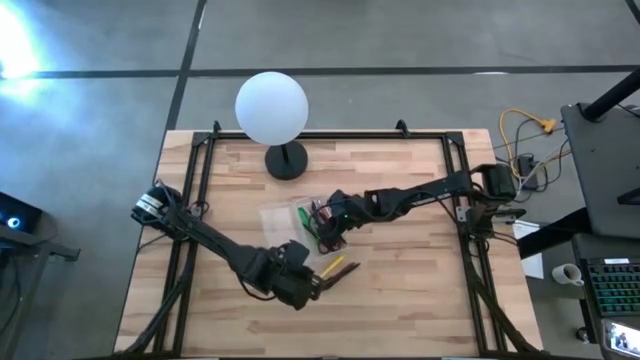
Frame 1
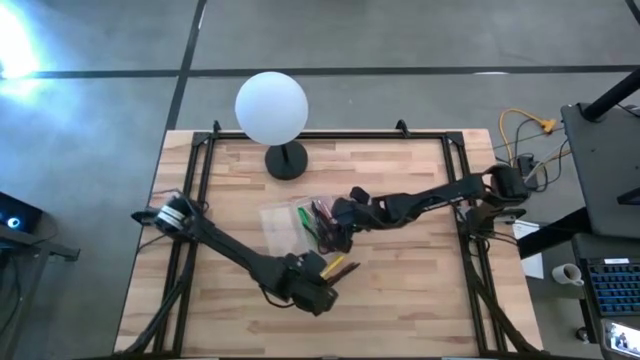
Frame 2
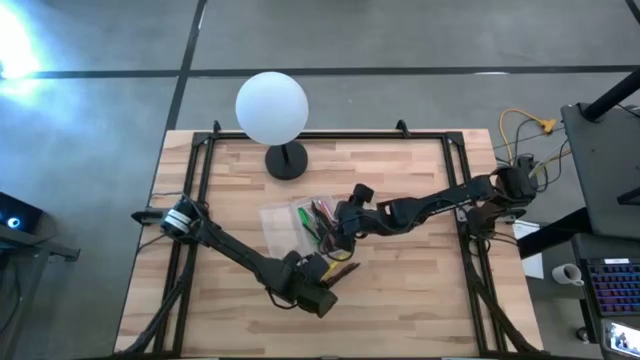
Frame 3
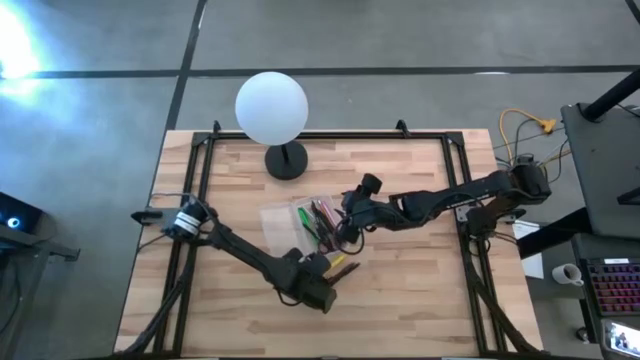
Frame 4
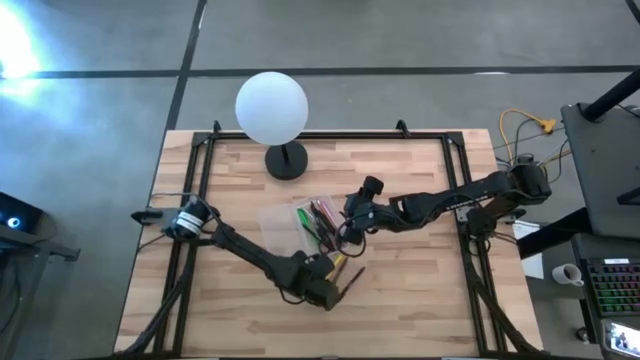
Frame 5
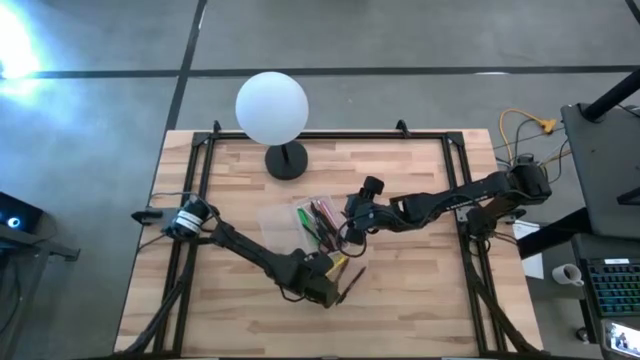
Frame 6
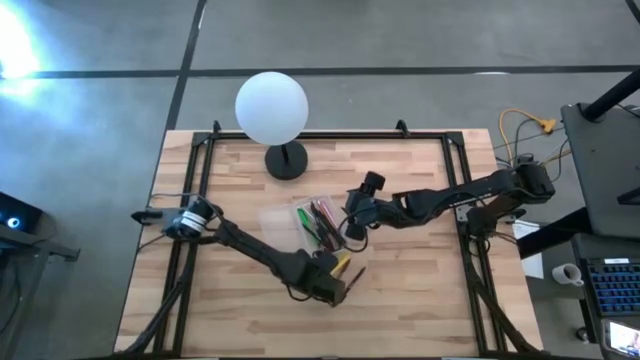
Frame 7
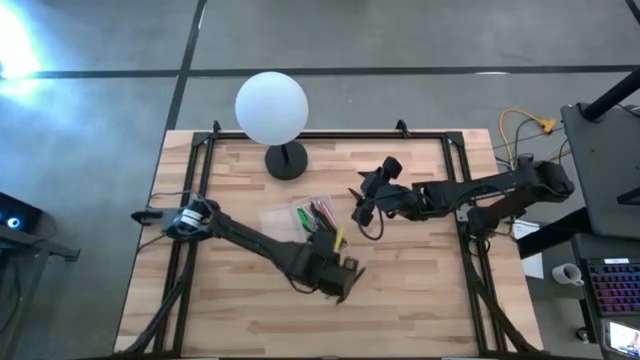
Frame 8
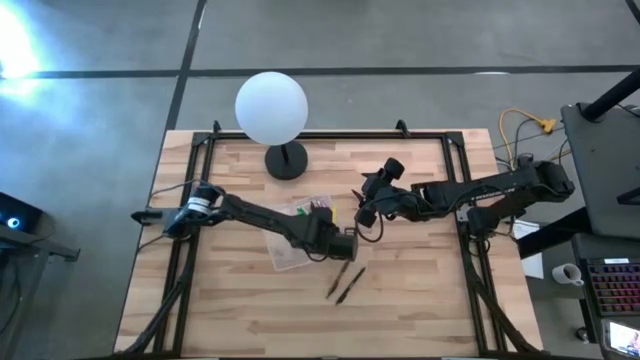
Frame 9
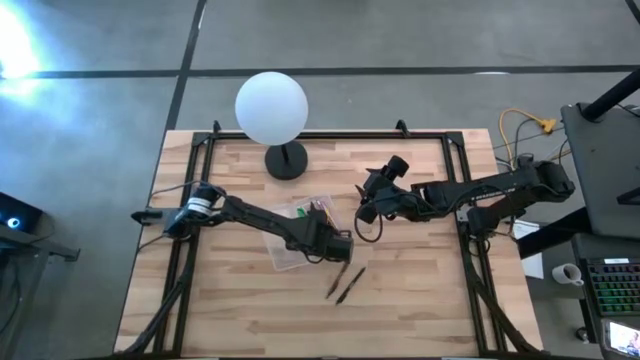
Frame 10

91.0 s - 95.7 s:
Task: Pick & place school supplies into a supply box
Put the yellow ballpen into the supply box

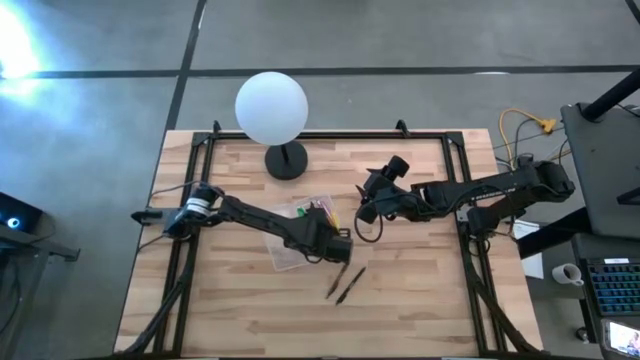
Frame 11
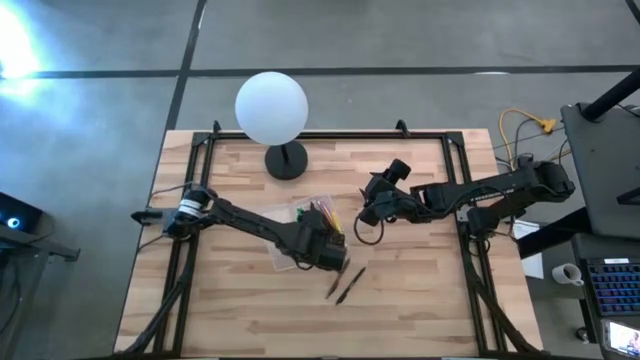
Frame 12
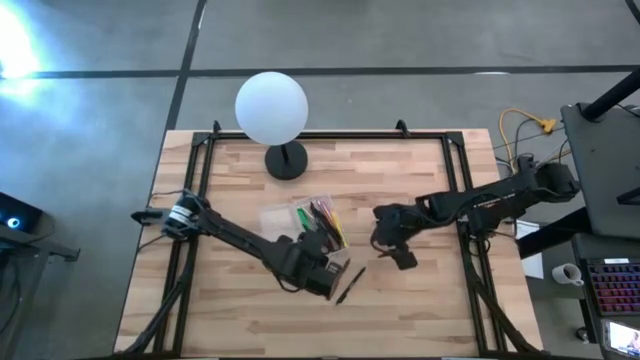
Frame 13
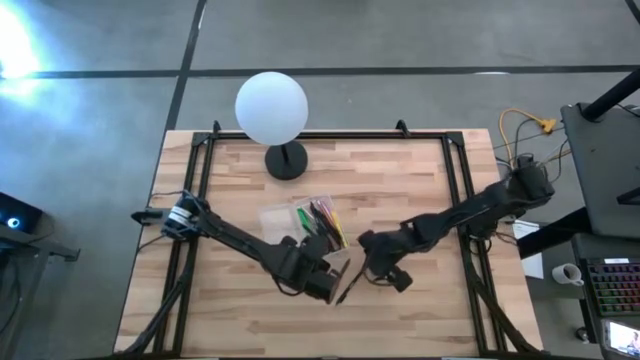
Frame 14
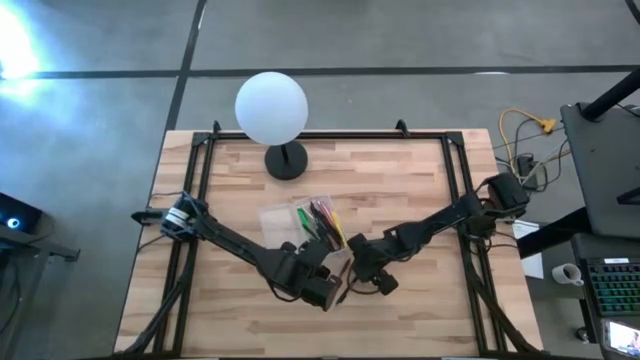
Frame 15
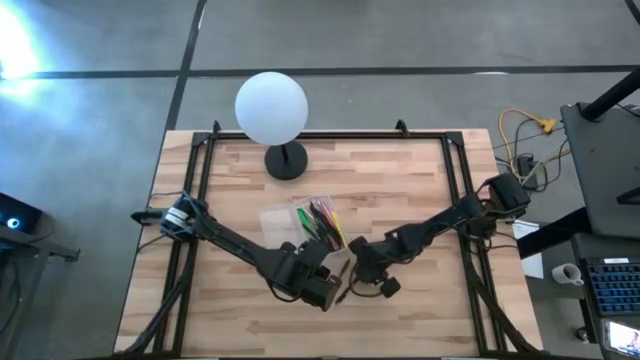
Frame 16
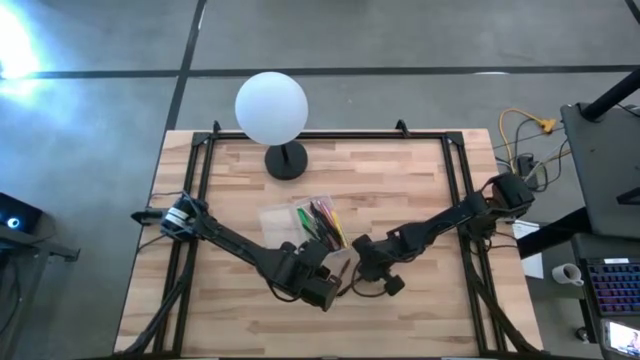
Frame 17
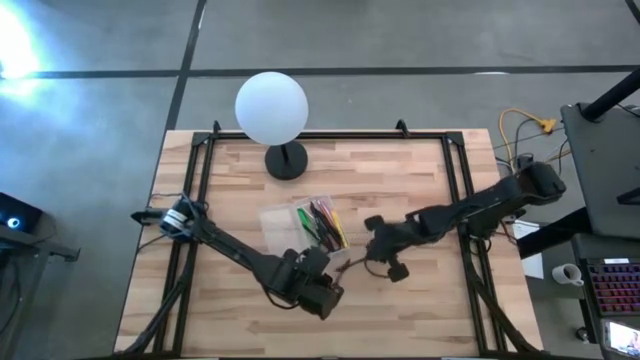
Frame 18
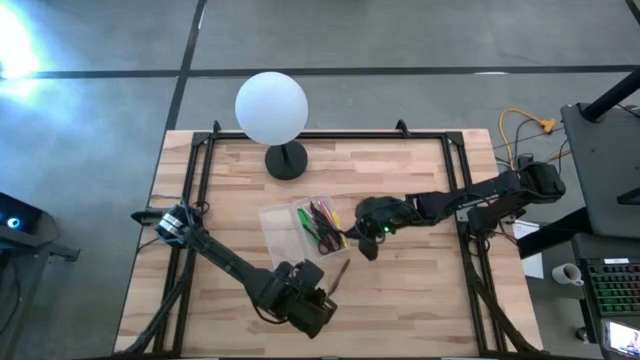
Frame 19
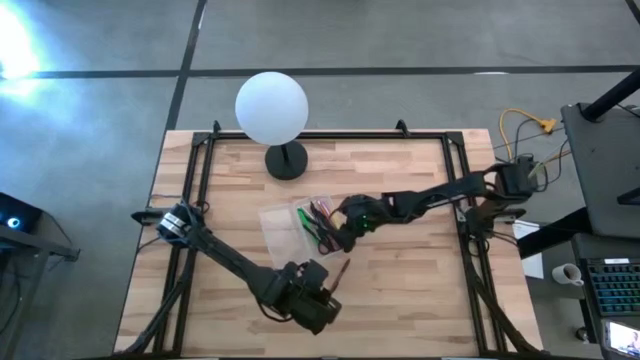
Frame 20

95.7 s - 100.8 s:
Put the black ballpen into the supply box

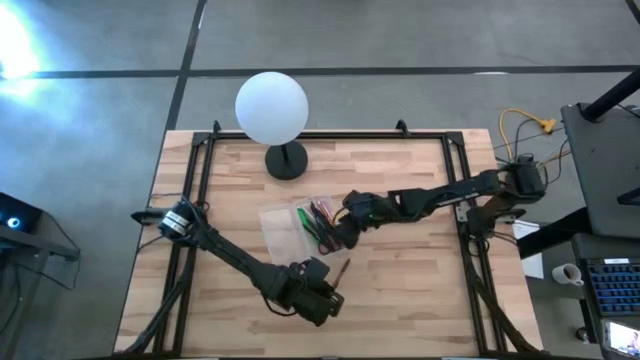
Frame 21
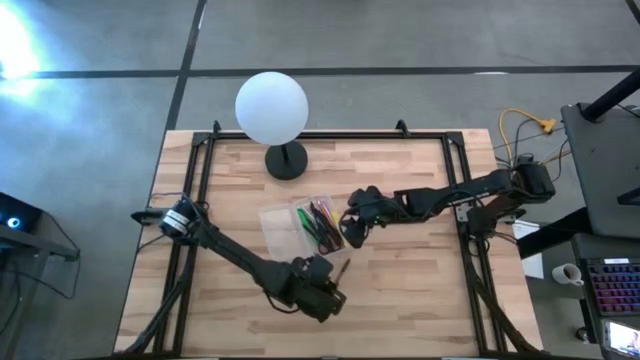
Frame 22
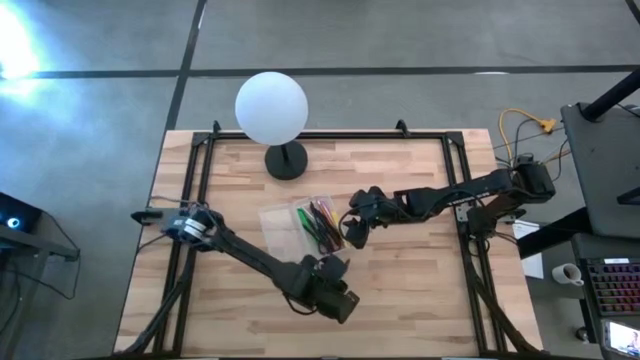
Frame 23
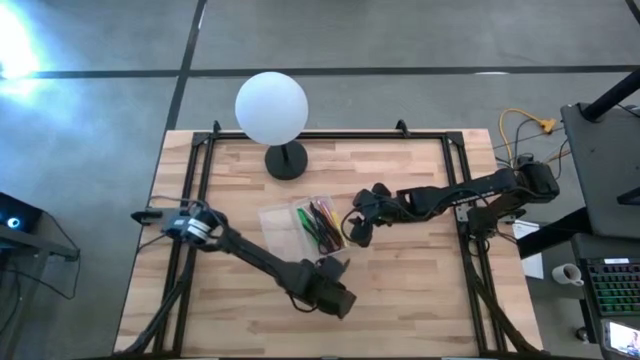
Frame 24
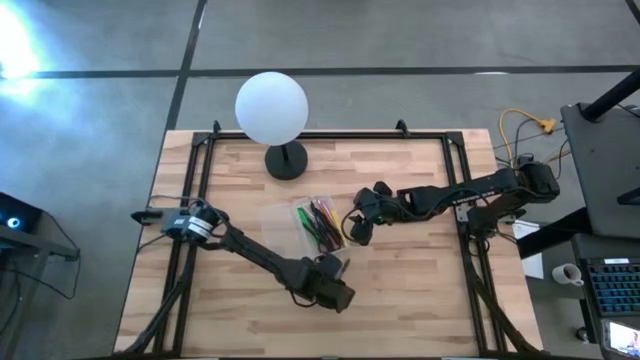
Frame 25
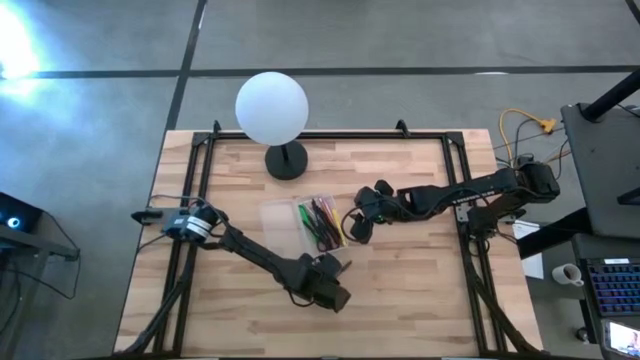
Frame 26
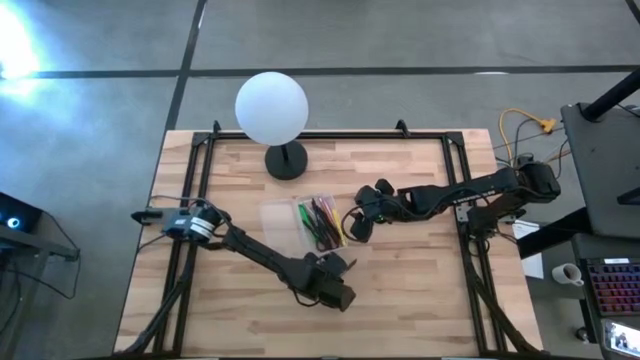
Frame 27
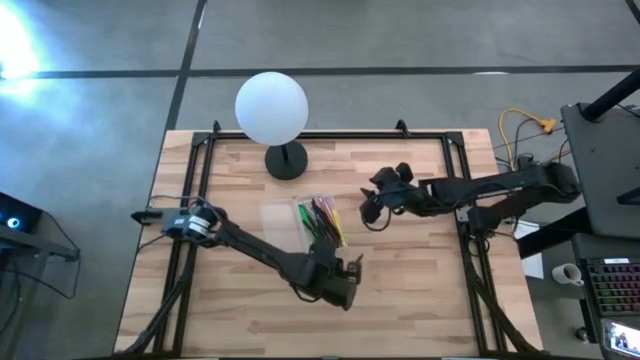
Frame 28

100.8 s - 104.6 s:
Put the brown ballpen into the supply box

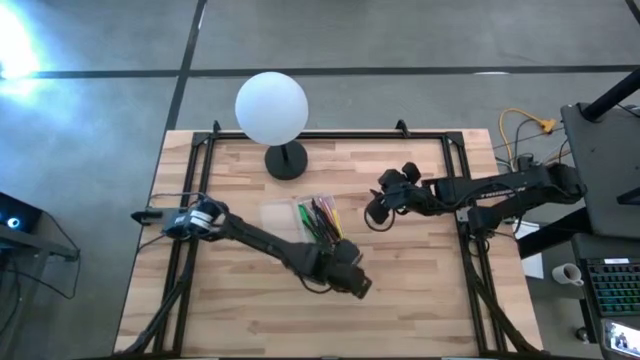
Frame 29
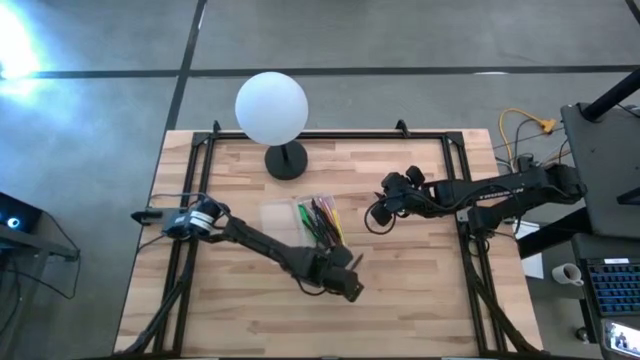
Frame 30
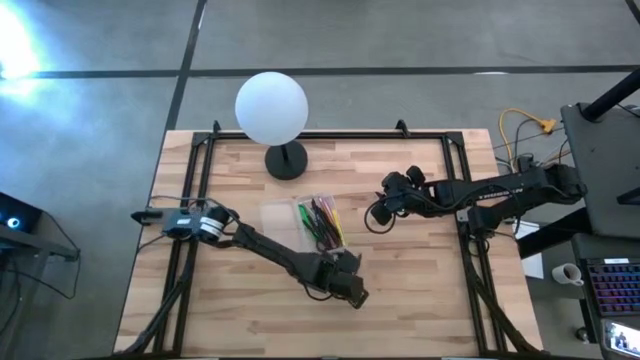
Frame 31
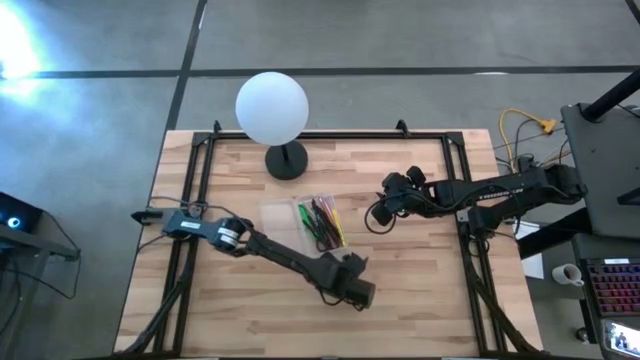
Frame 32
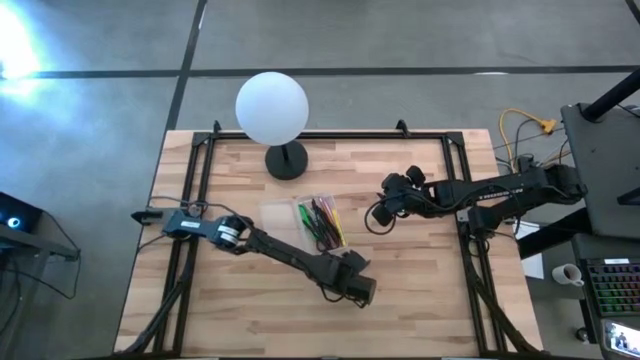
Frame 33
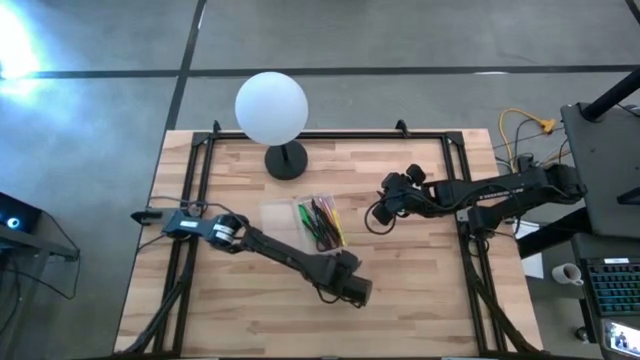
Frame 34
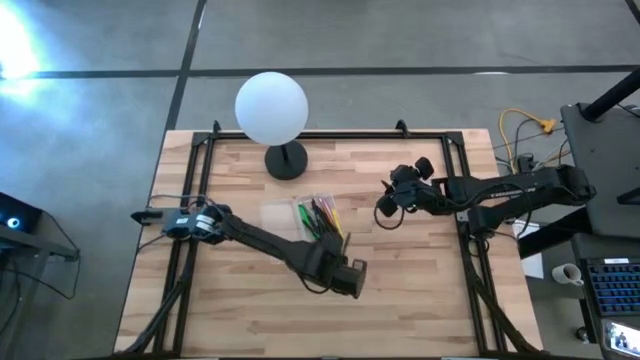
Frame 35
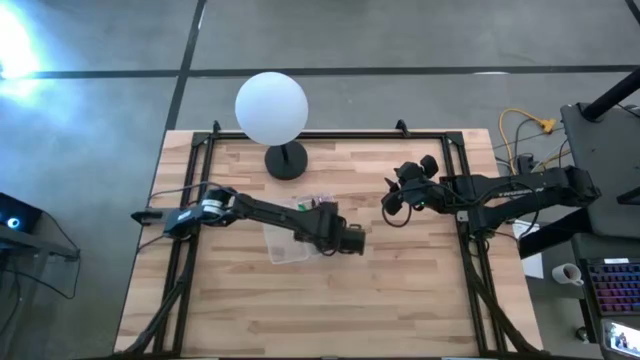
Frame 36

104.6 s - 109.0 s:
Put the brown ballpen into the supply box
